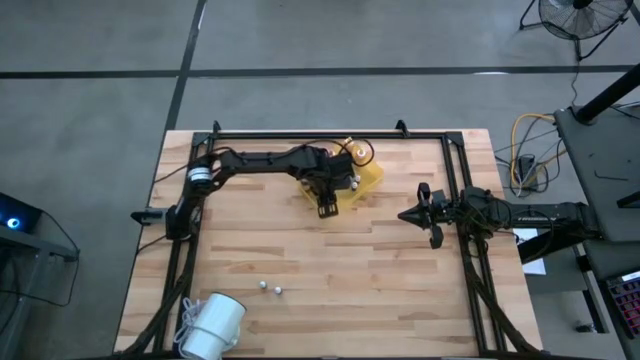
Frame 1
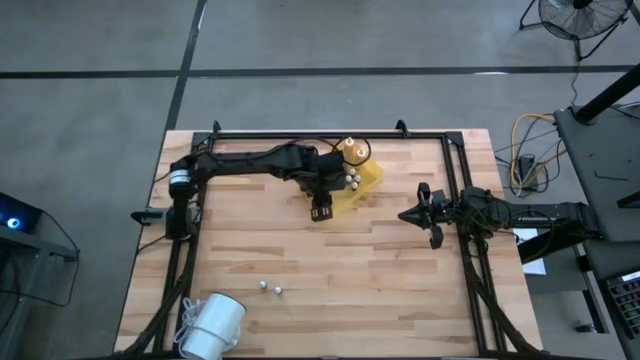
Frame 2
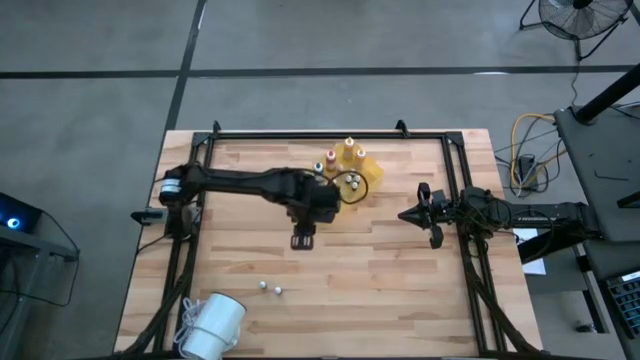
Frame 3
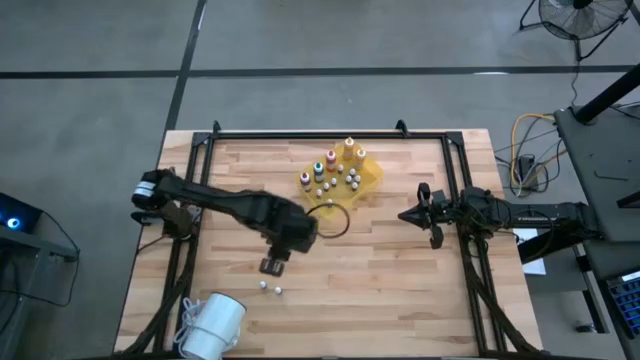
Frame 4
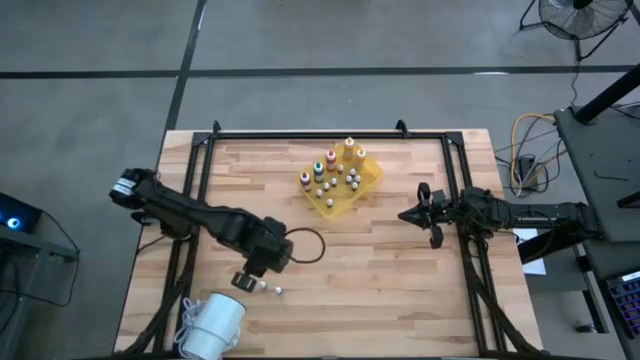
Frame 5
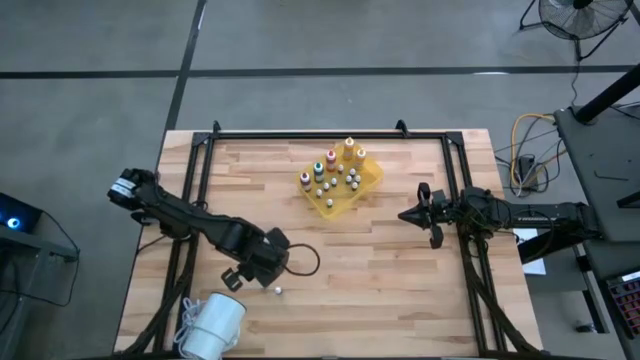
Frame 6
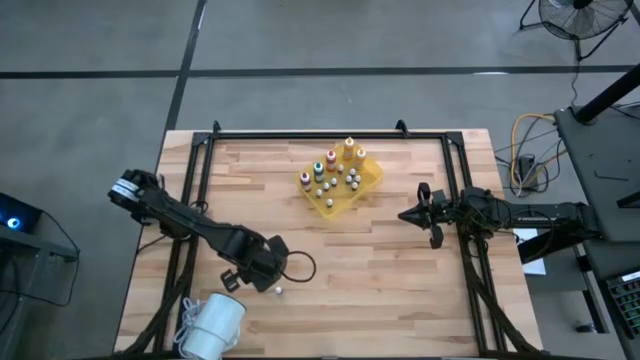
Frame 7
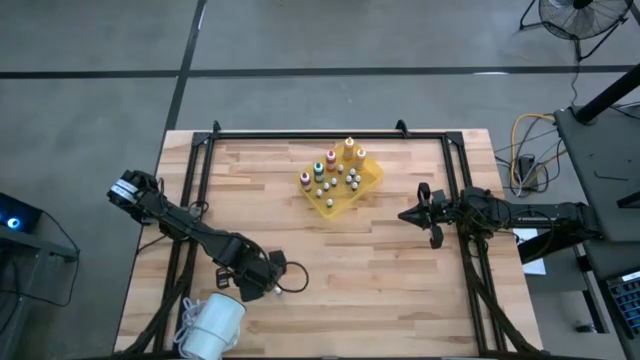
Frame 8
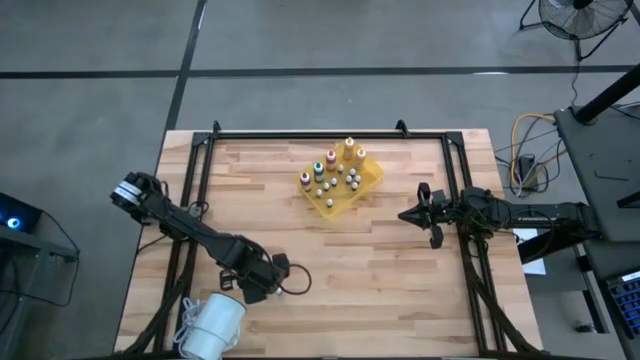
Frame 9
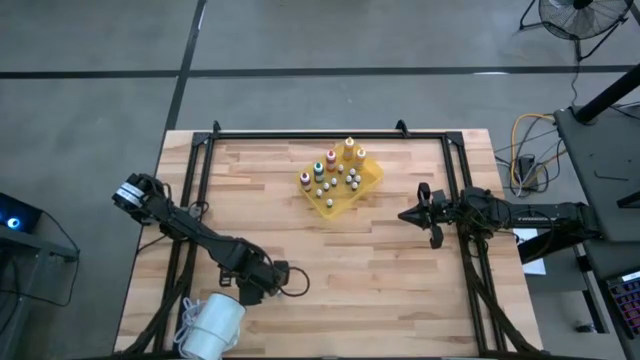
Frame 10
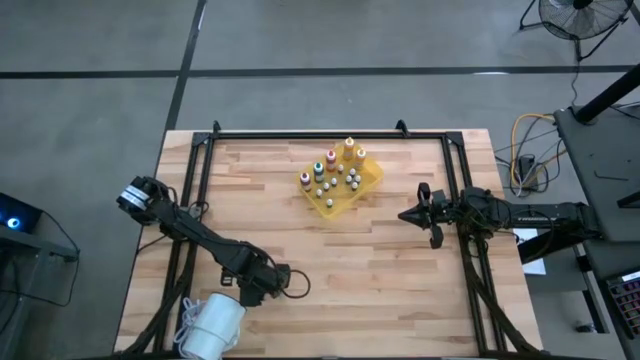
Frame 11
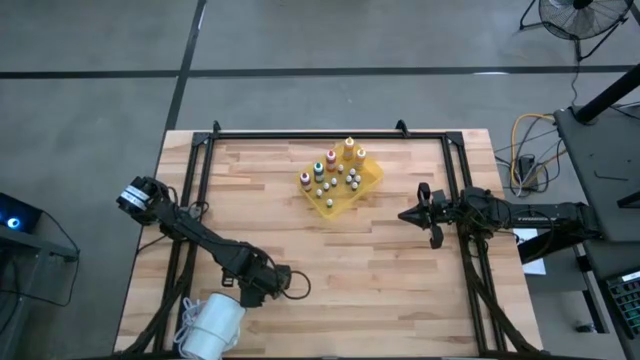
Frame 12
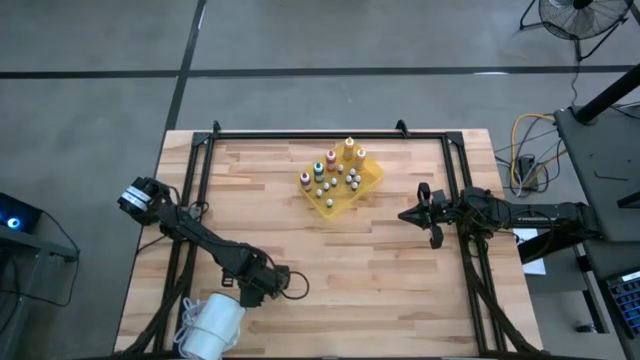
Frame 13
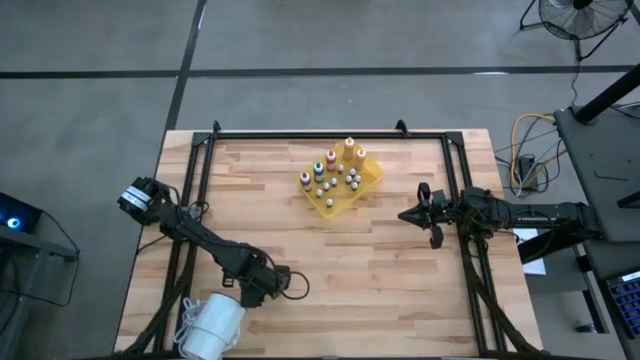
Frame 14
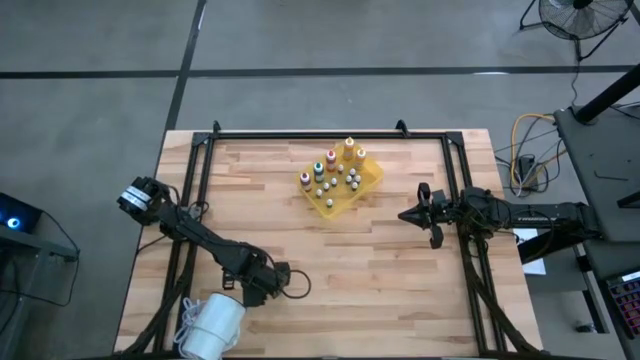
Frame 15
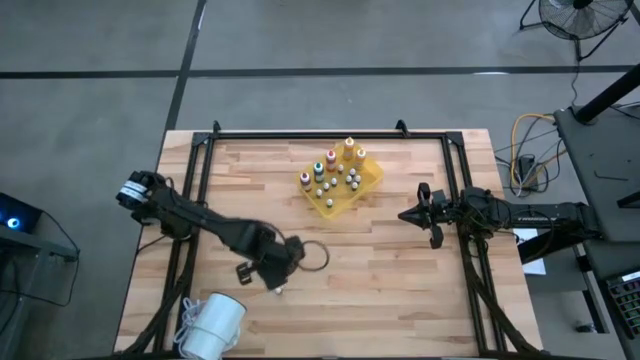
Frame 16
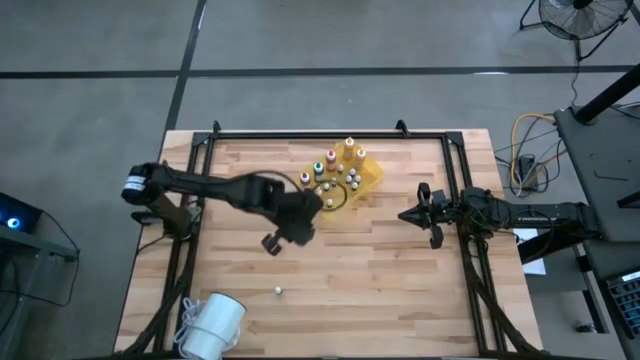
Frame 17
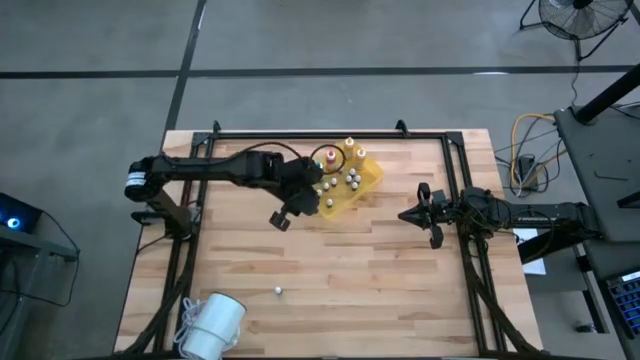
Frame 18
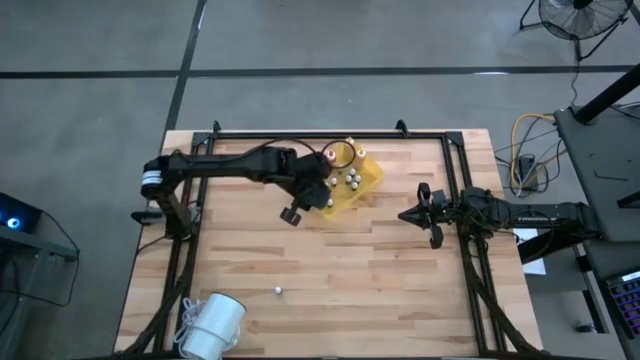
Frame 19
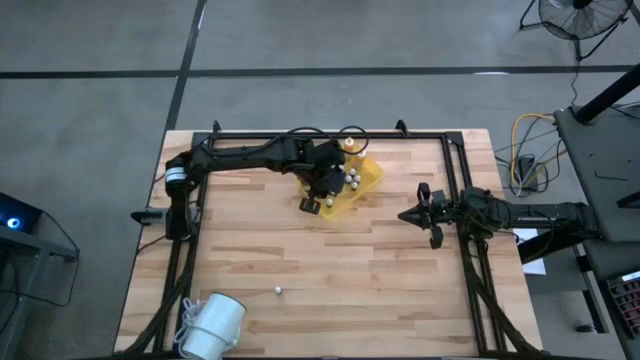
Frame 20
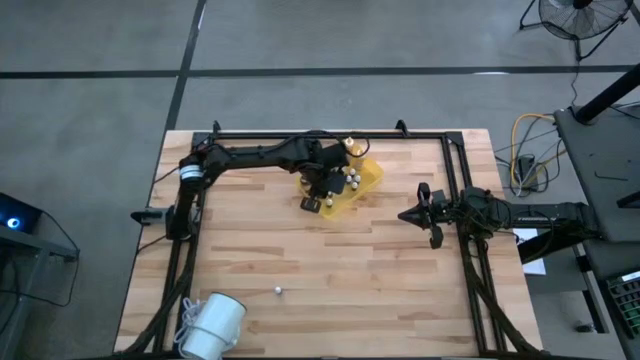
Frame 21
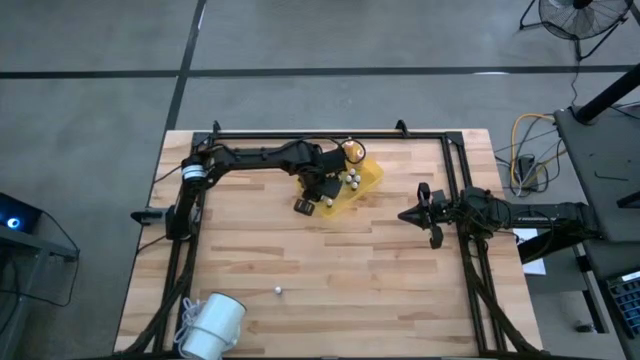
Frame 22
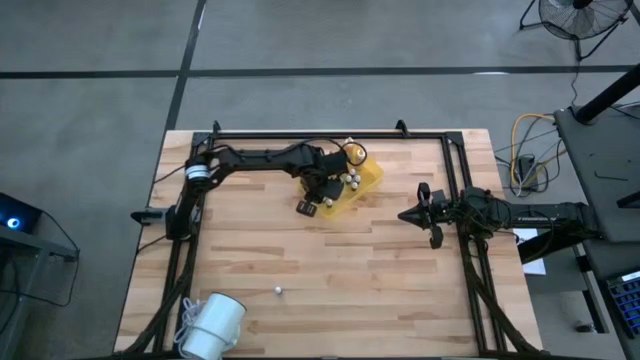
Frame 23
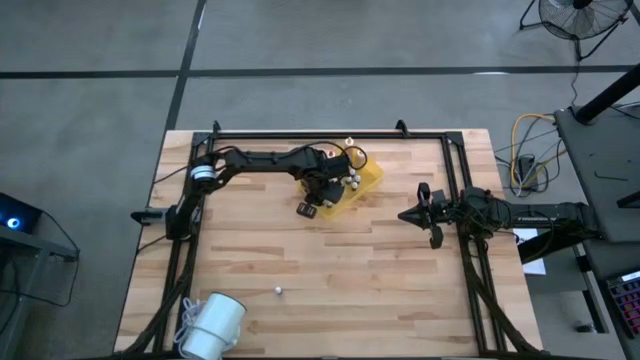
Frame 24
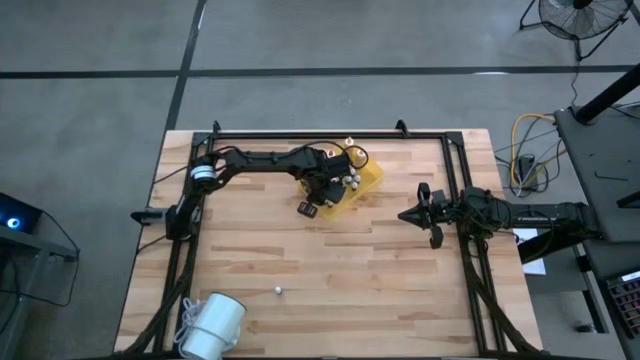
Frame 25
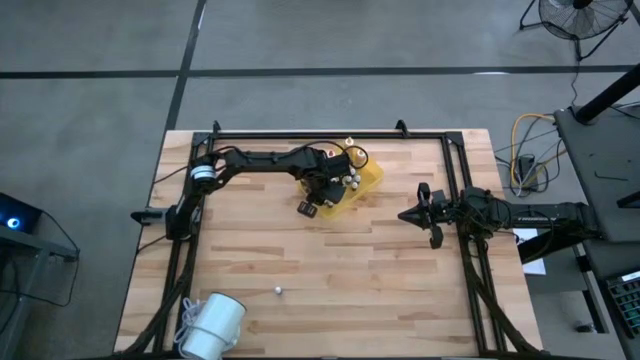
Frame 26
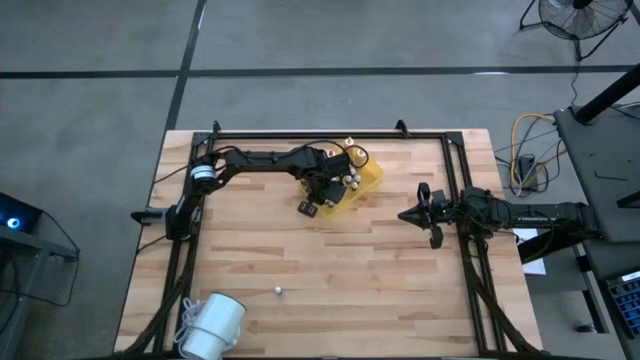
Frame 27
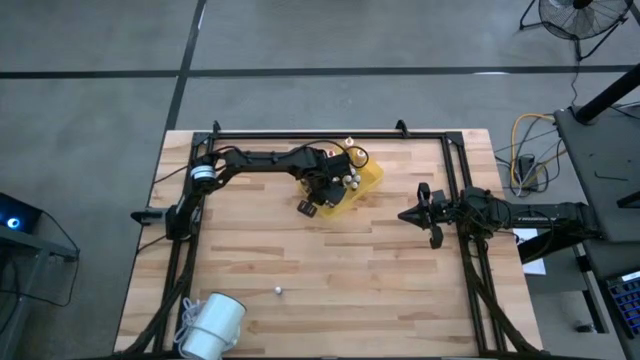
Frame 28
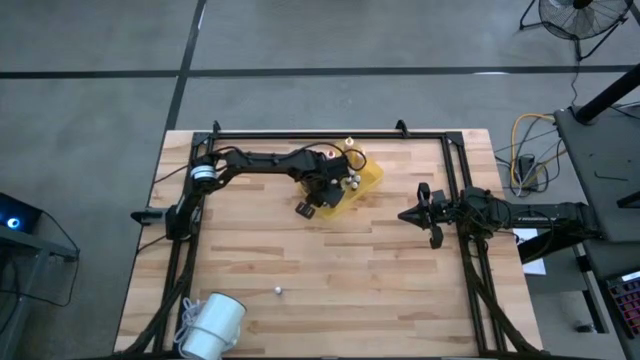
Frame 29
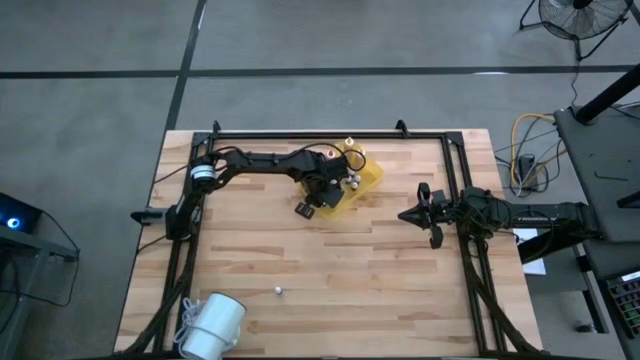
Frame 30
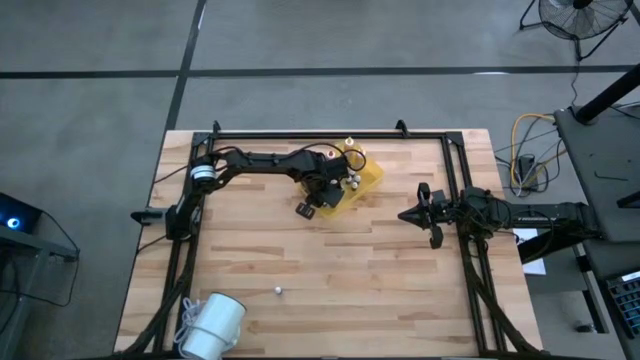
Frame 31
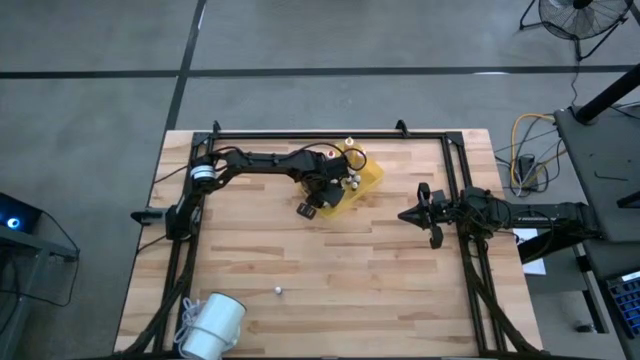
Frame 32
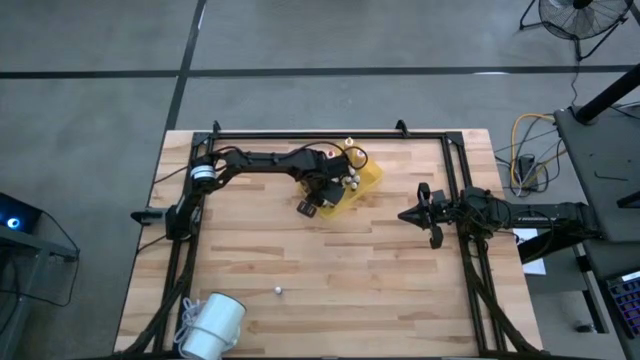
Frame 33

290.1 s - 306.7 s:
Task: Pick & Place food coloring
Put the small green food coloring bottle into the yellow bin
